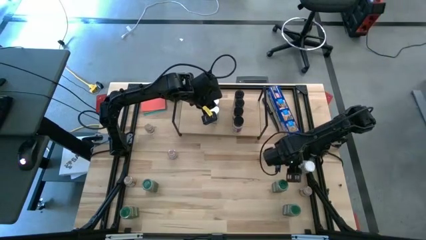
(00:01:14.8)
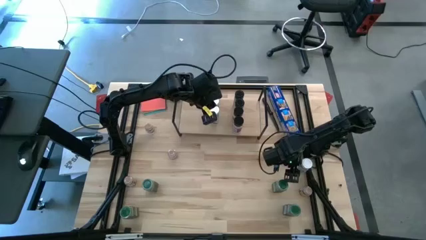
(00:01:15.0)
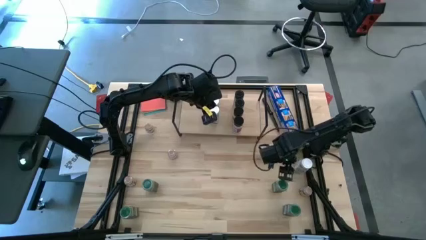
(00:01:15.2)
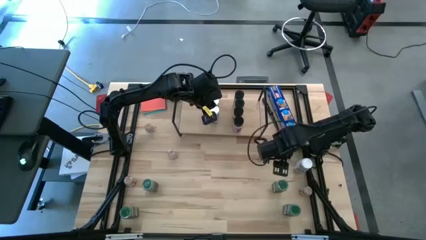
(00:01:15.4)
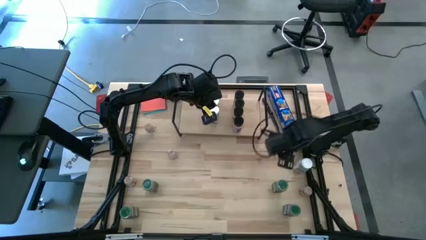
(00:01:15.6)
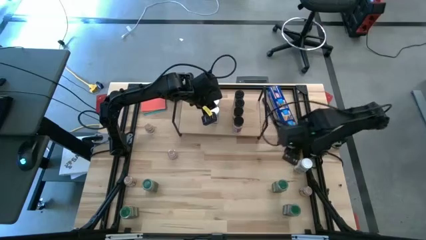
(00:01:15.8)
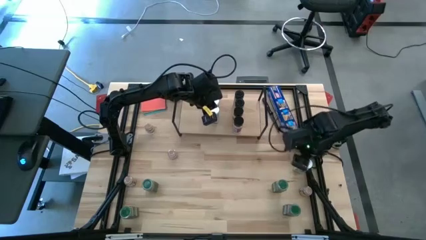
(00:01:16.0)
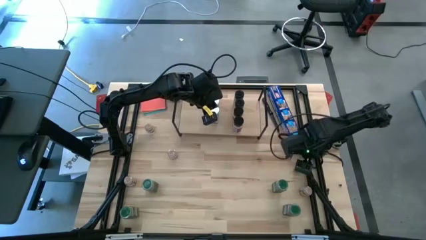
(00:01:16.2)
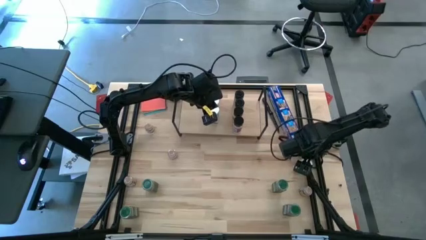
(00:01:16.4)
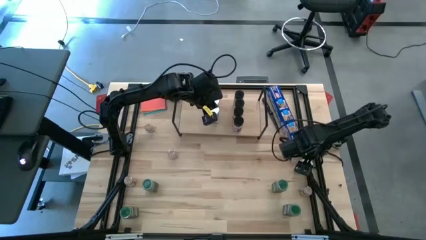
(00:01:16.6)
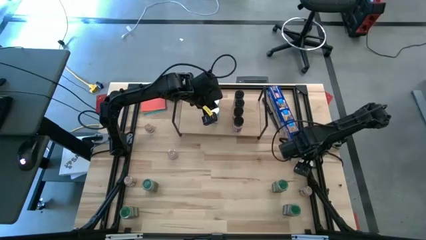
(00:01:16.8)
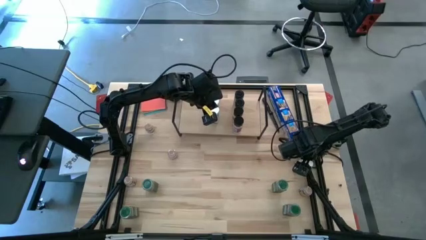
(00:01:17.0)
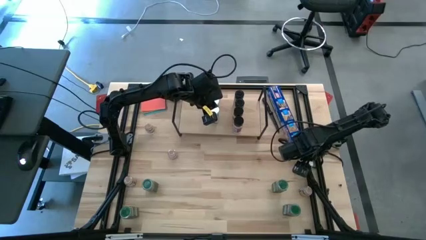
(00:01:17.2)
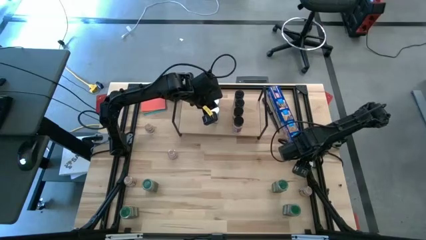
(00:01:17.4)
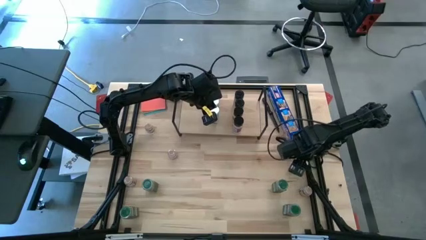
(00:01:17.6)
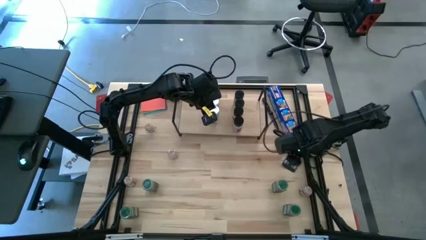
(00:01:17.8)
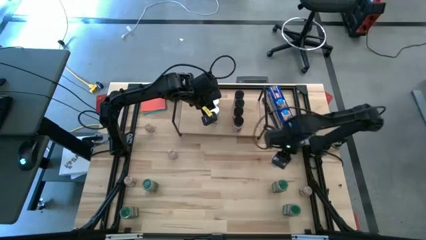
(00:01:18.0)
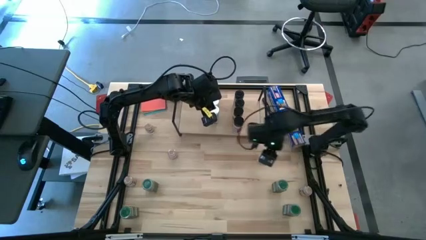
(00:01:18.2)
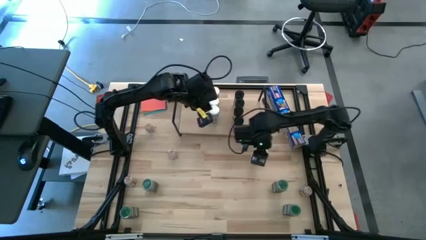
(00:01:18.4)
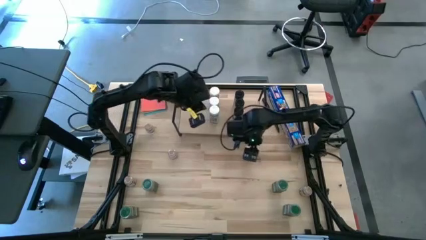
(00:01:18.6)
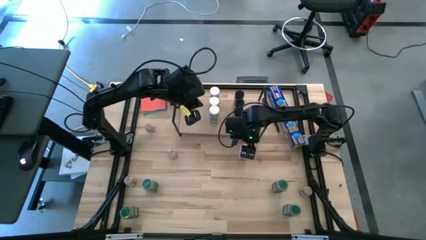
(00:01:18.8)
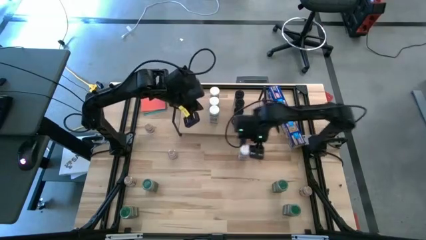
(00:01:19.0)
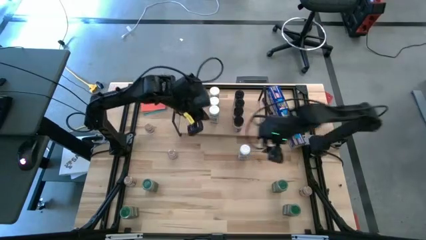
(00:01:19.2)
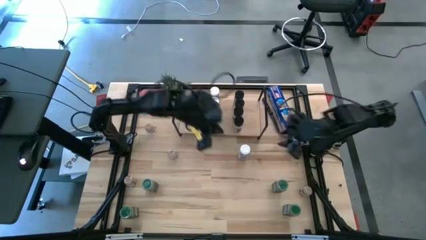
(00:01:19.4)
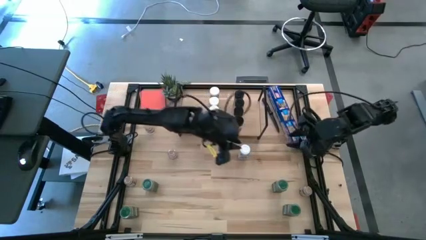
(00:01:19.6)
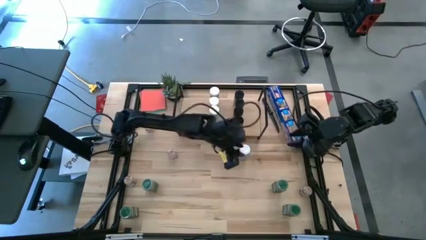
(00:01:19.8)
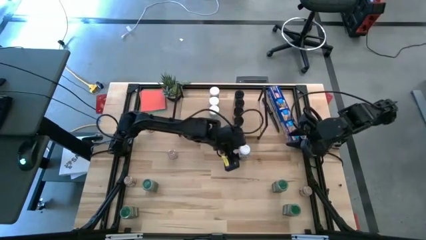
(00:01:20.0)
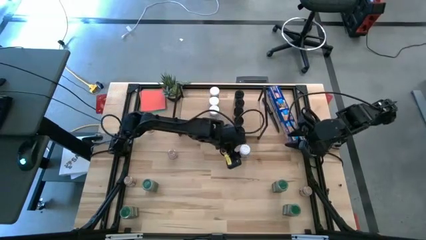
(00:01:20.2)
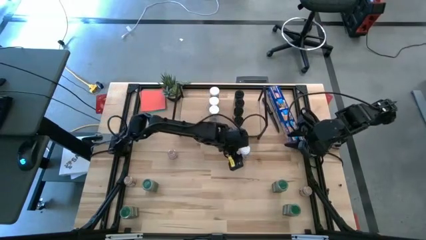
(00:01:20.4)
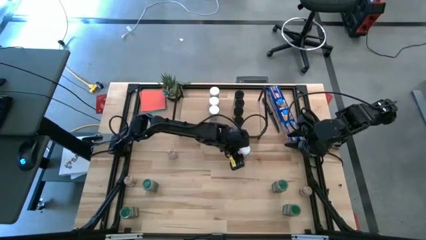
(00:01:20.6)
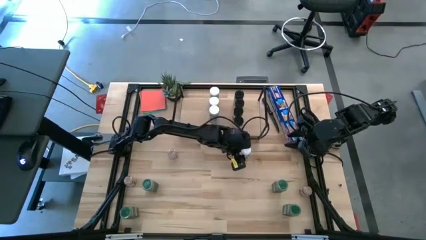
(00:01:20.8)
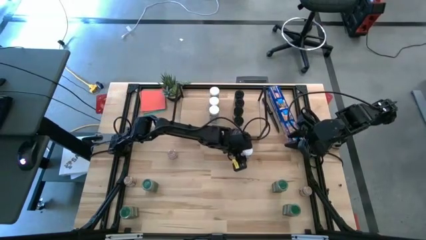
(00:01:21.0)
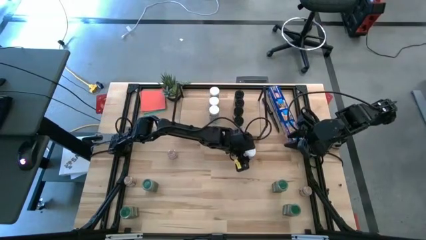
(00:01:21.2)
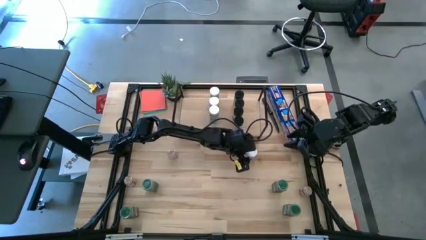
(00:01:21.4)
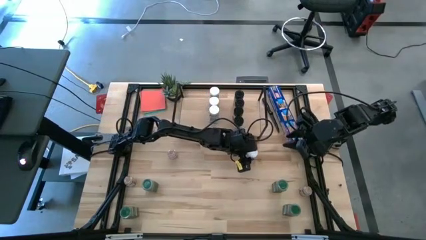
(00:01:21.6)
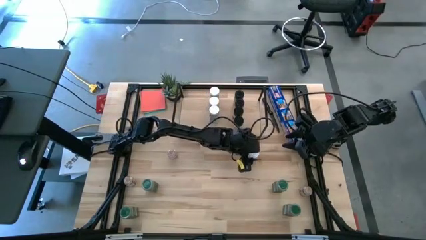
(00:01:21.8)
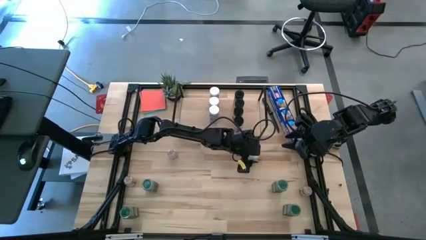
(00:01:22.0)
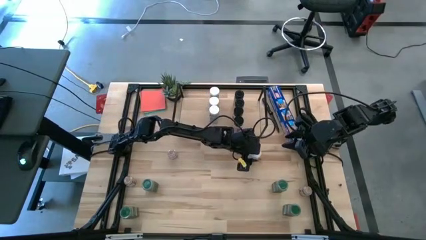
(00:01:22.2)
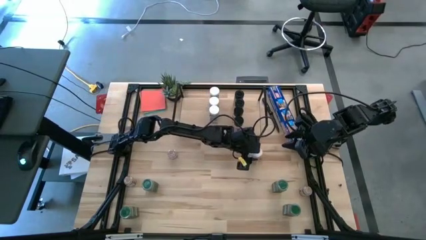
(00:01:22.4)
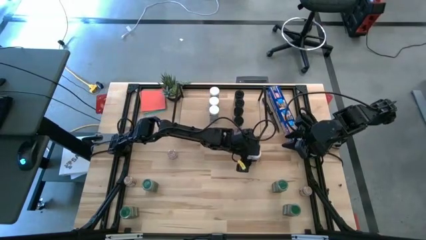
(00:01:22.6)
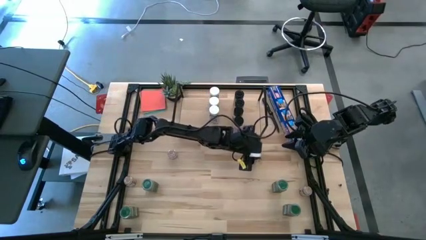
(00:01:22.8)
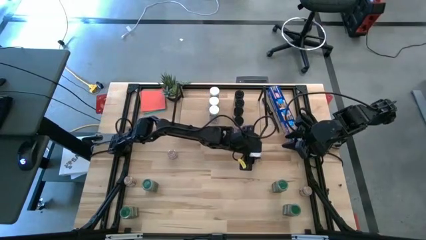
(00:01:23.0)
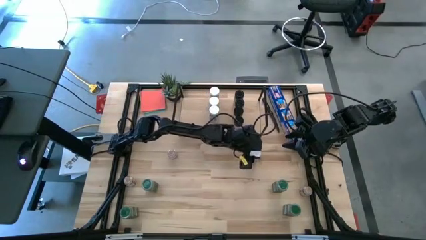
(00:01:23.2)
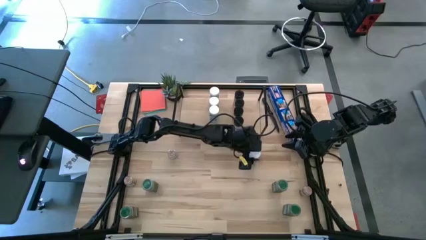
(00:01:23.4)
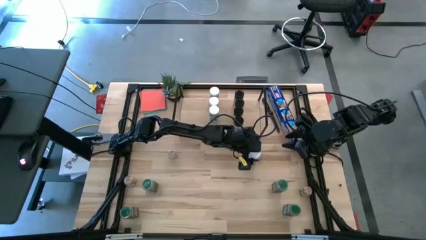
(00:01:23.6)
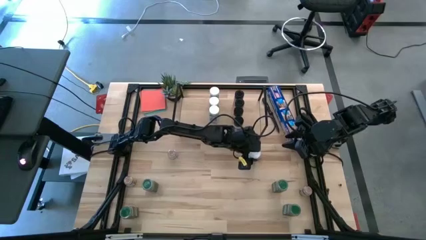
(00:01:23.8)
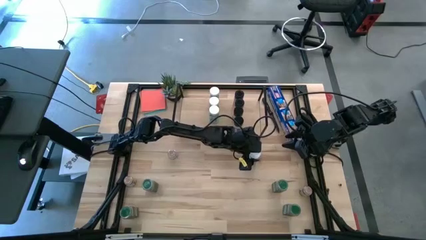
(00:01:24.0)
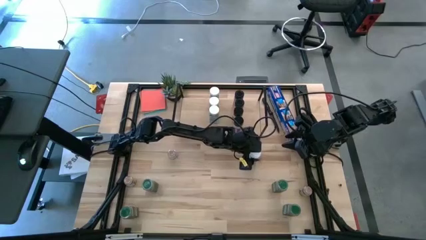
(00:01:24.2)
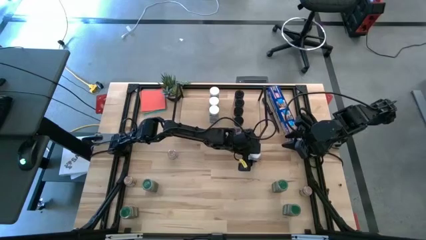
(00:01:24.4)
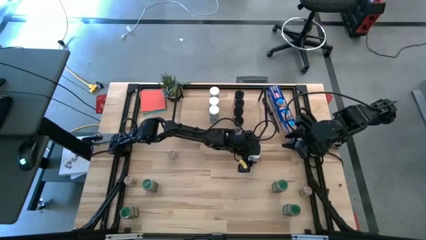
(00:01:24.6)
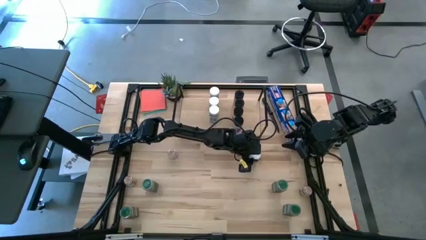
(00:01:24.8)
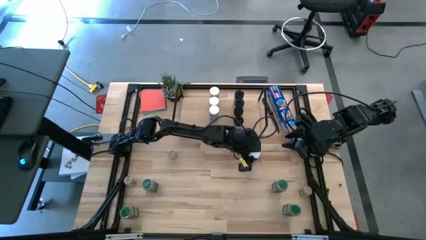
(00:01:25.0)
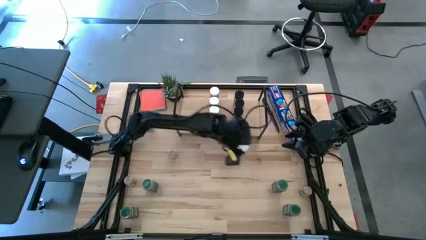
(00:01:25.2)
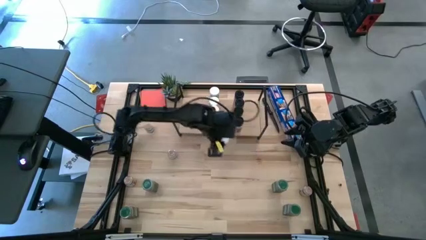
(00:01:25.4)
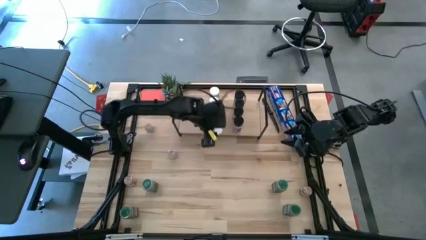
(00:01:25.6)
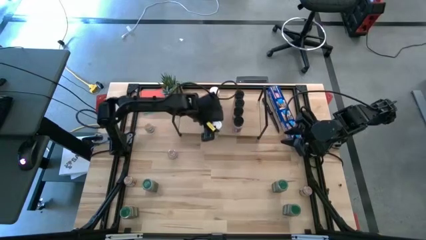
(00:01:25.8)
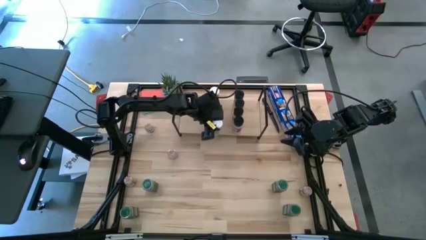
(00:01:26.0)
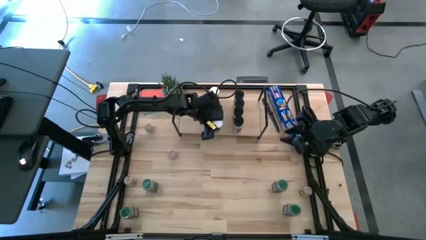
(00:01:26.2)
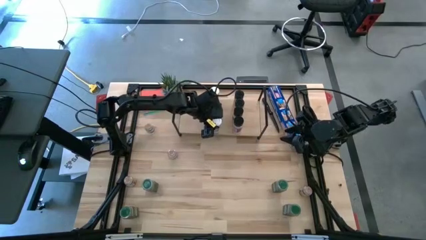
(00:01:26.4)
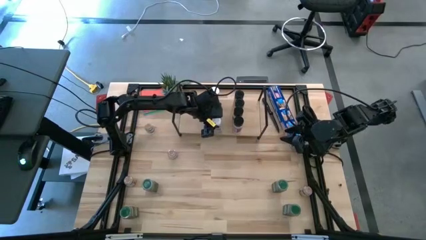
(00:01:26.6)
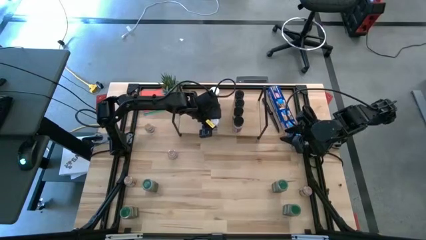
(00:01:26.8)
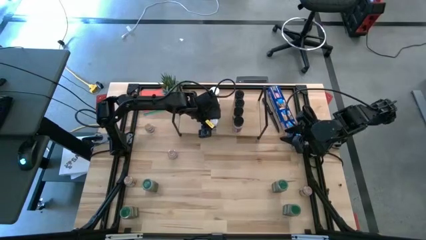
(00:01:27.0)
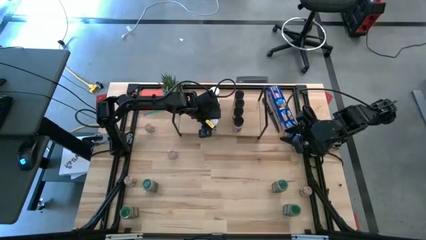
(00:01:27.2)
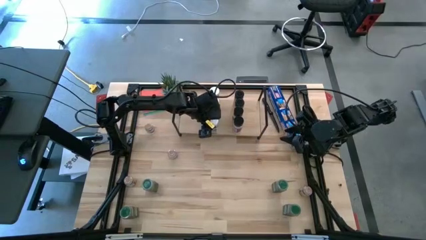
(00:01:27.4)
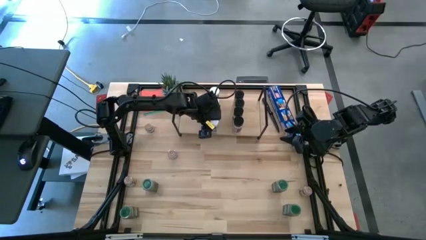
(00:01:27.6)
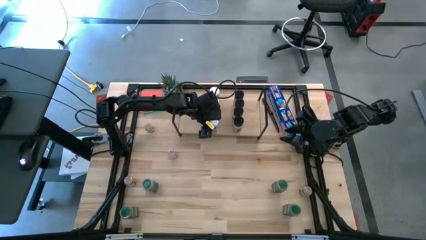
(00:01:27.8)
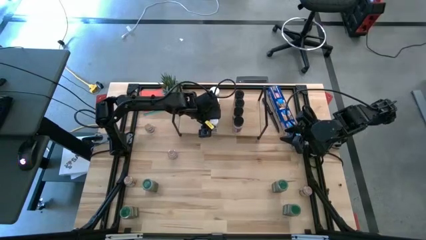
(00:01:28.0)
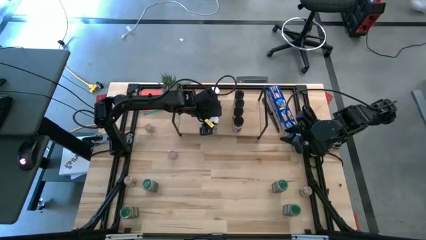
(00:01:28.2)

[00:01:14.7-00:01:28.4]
Task: Shelf spices
Put the white seasoning bottle on the shelf aligned with the other white seasoning bottles

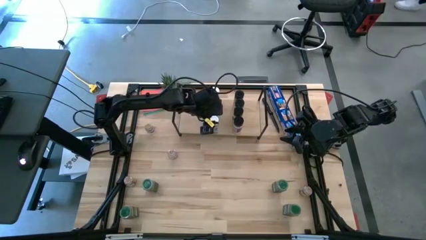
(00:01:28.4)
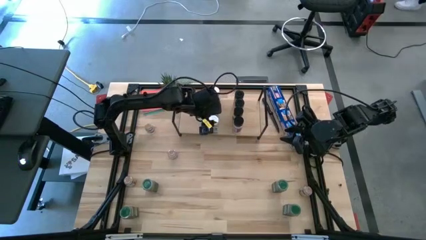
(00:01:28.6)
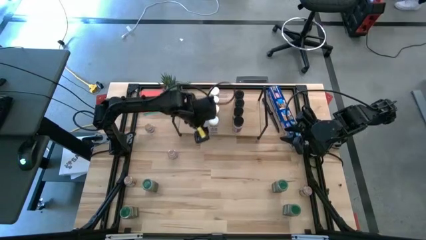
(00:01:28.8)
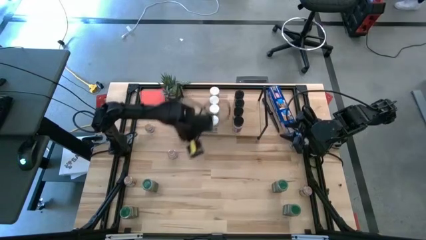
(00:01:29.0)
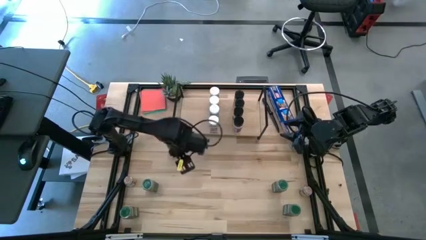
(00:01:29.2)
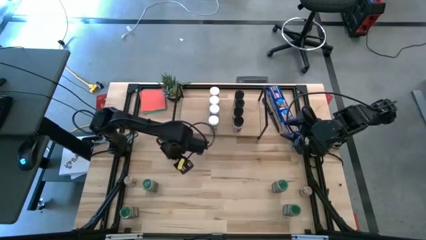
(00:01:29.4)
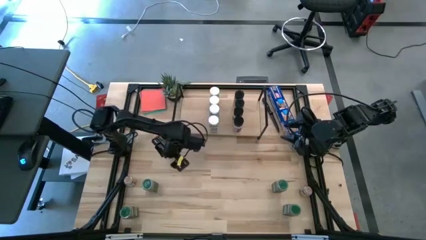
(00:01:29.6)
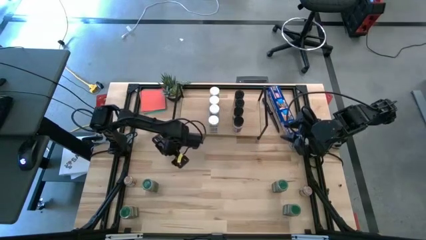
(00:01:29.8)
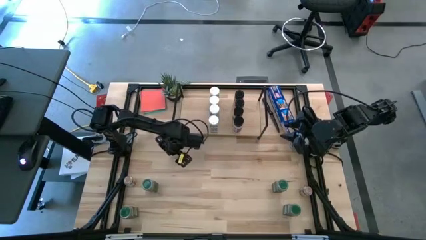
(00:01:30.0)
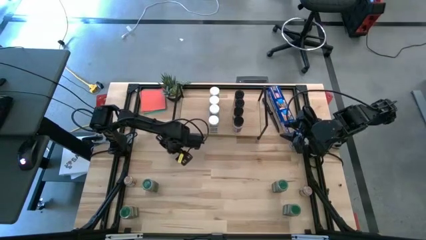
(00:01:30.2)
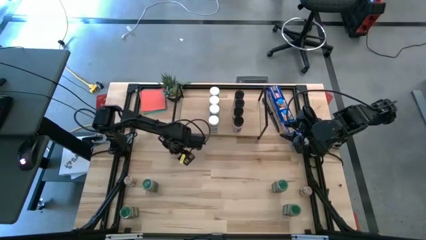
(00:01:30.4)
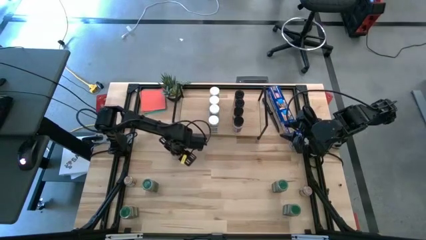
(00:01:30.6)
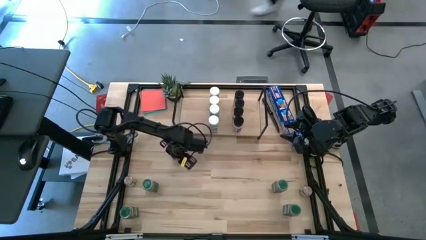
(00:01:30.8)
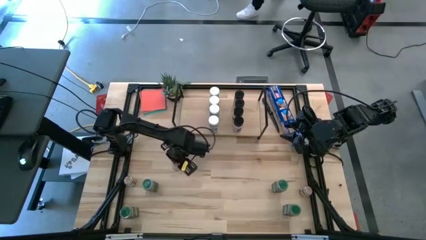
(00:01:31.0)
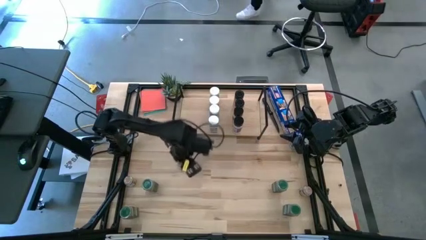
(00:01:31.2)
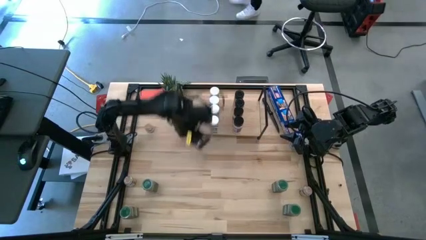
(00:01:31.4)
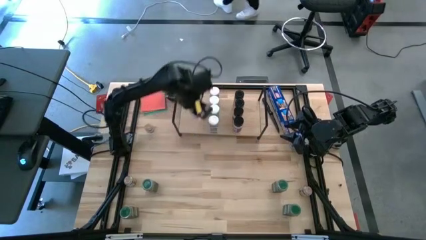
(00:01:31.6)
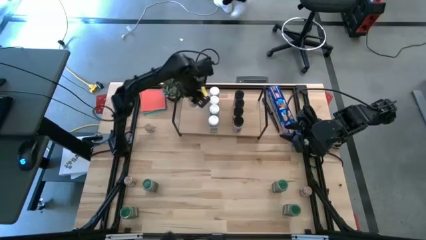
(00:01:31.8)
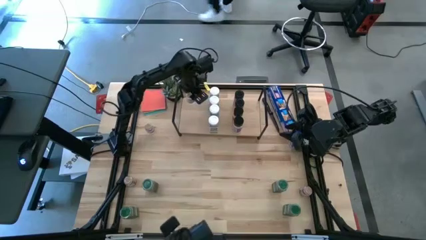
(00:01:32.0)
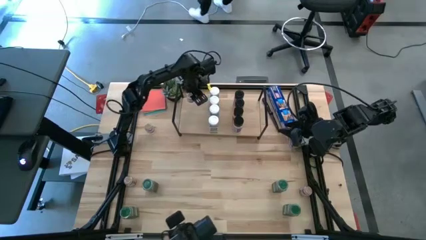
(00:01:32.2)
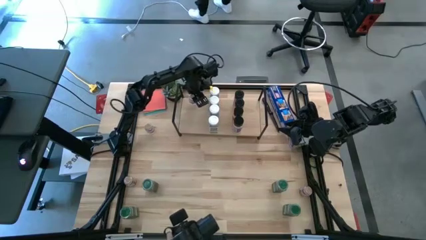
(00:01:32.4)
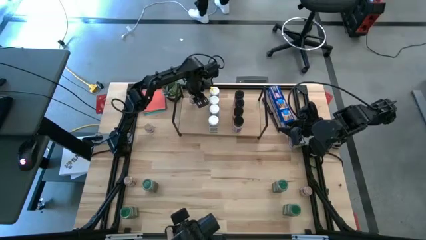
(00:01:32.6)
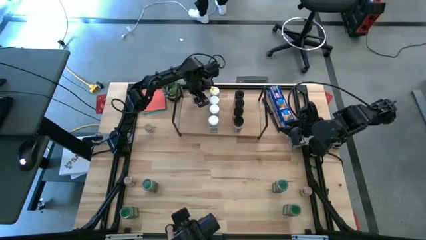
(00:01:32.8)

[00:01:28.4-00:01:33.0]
Put the brown seasoning bottle on the shelf
